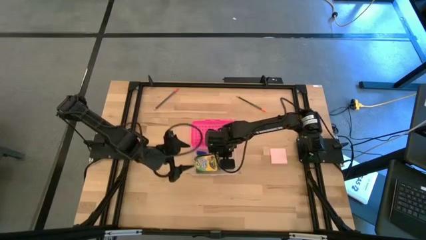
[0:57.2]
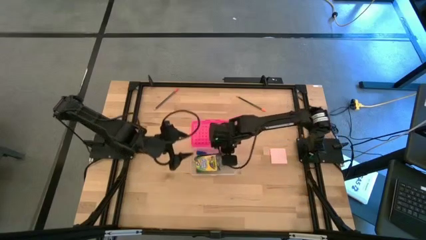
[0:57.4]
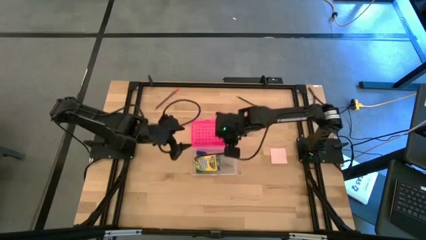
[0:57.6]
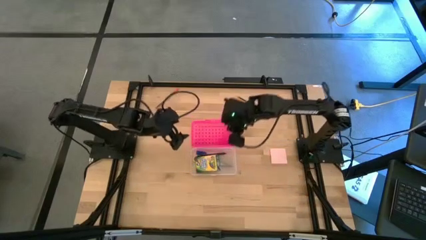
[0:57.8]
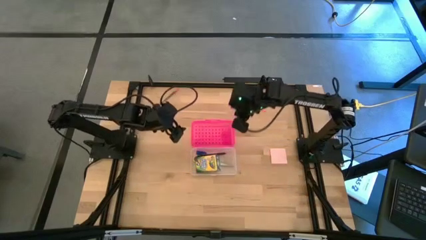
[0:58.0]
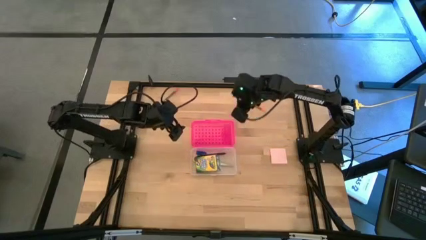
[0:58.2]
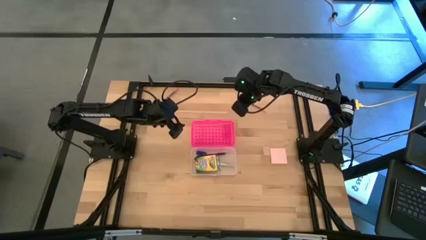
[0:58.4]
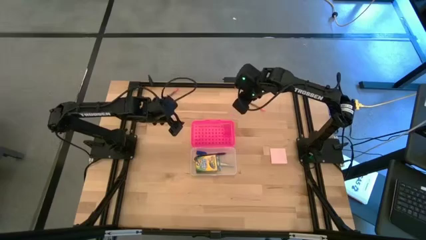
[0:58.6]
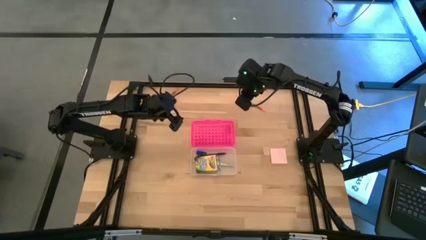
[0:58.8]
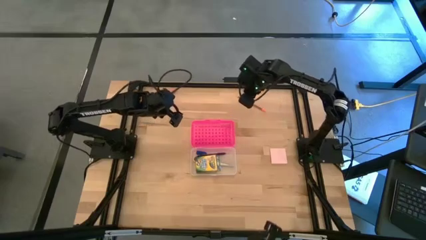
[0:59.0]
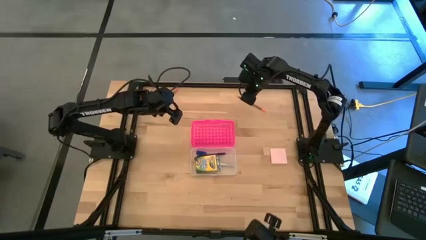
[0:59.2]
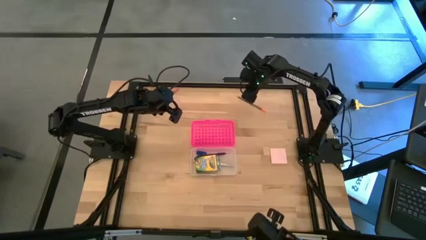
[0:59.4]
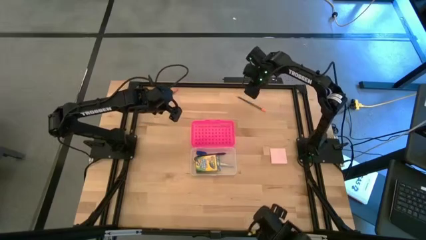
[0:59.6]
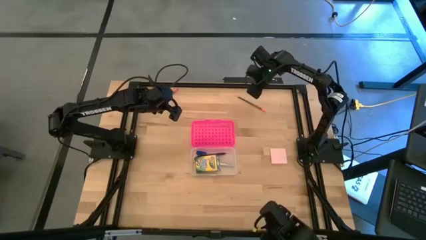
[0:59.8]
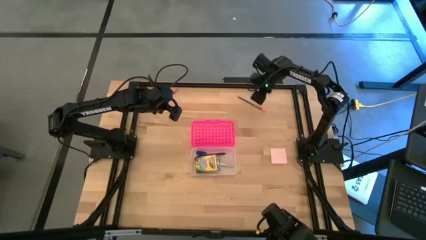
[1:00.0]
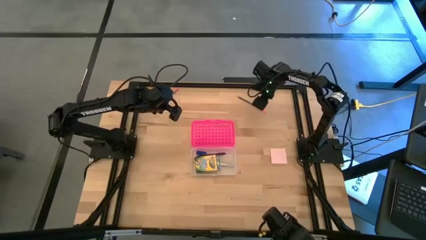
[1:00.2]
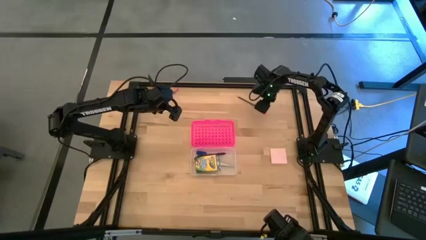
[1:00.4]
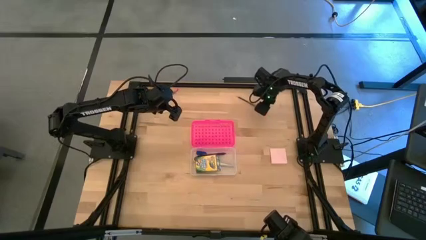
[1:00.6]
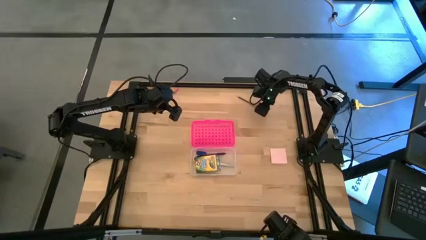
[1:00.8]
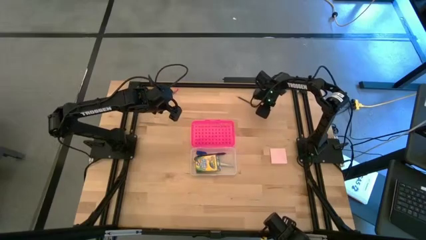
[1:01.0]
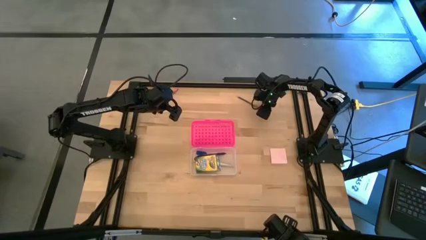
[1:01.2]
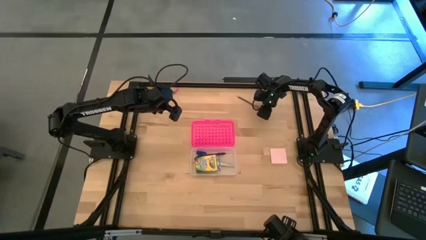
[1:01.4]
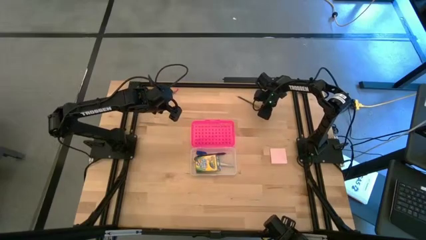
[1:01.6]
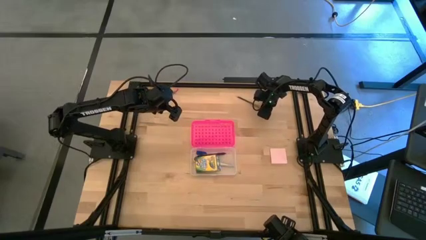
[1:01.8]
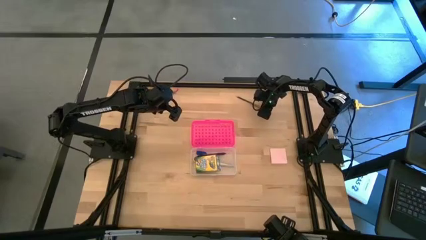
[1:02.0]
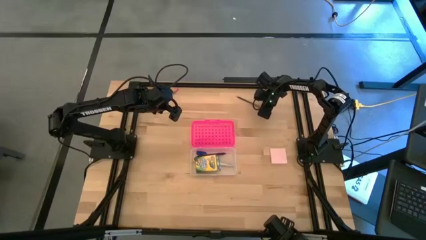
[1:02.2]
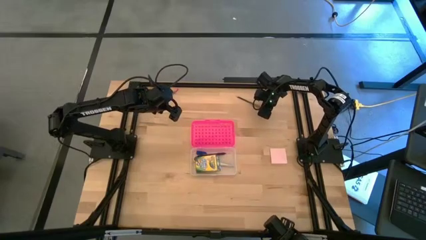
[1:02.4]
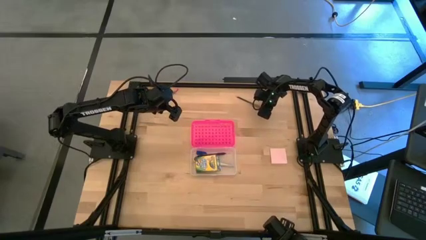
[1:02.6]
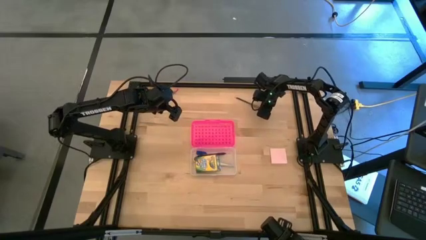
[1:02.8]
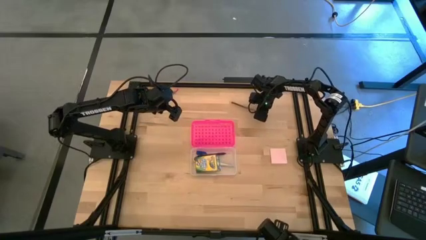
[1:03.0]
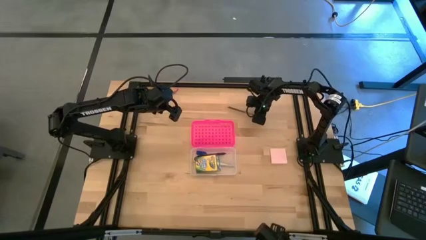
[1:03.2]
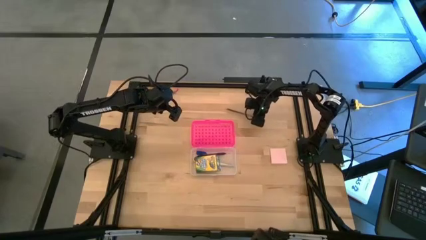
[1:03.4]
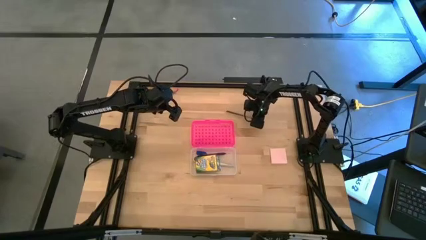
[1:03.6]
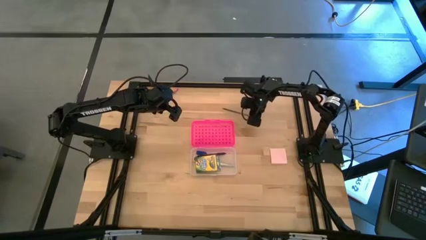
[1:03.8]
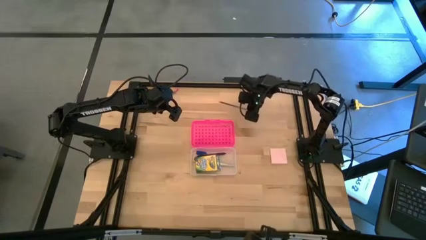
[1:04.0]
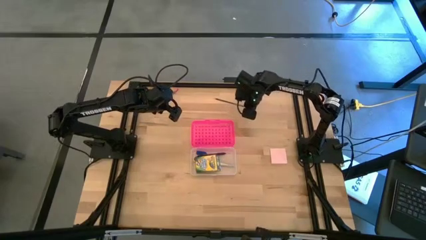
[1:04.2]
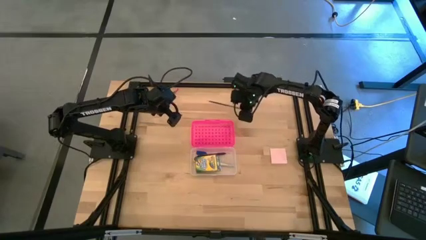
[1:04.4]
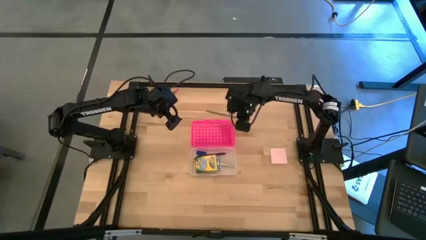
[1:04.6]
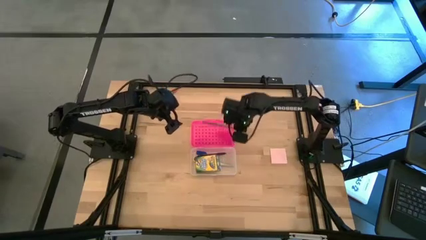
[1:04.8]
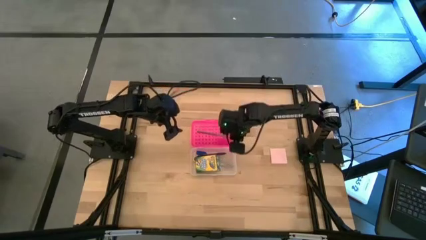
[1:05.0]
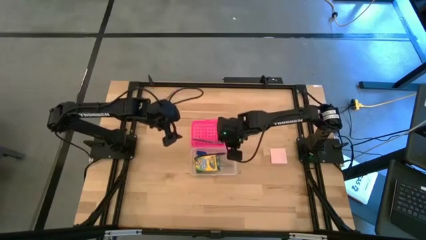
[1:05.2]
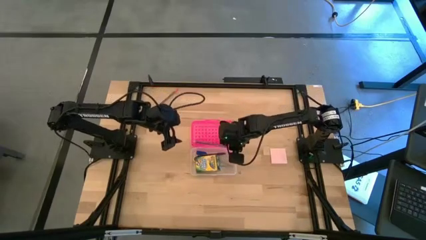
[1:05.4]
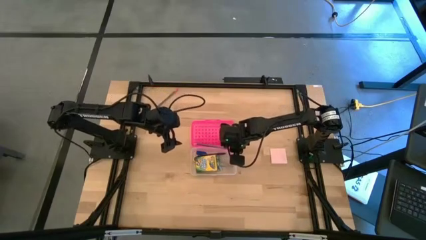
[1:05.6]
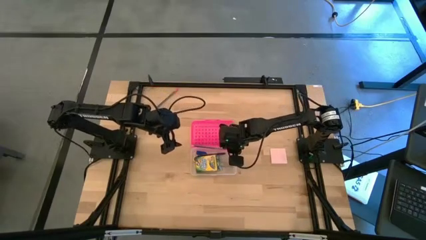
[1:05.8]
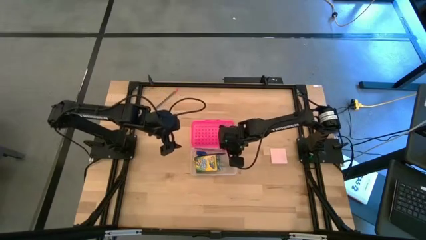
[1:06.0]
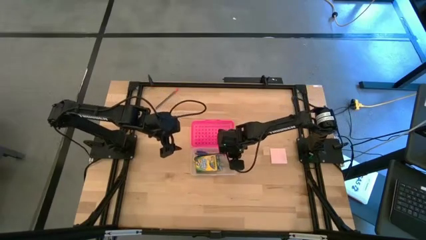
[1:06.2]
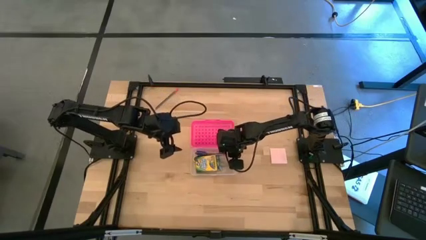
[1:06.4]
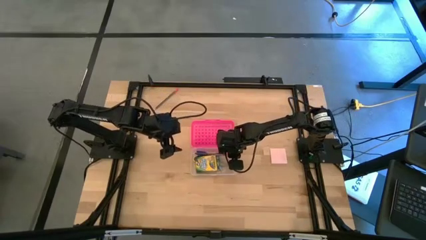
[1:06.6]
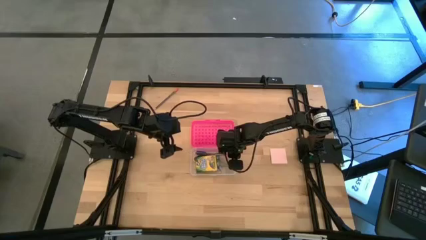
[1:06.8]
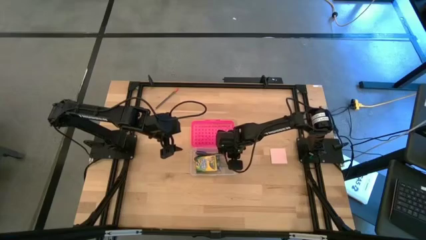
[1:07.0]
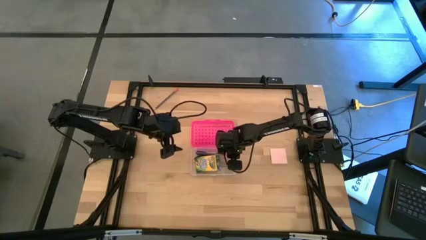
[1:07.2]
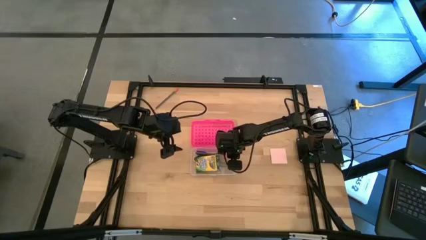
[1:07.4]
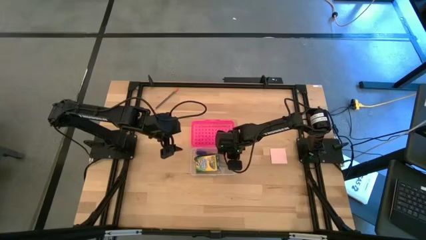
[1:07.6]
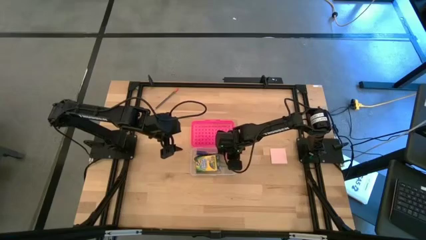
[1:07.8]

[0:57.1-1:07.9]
Task: Pack school essentials
Put the right black pencil into the pencil case

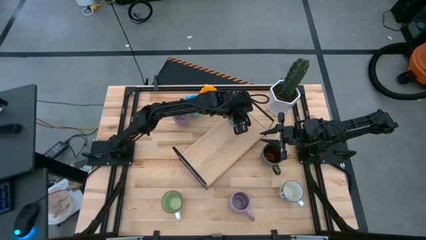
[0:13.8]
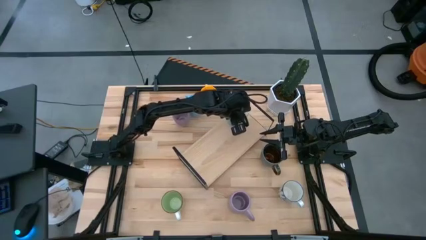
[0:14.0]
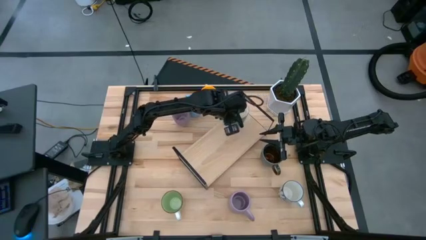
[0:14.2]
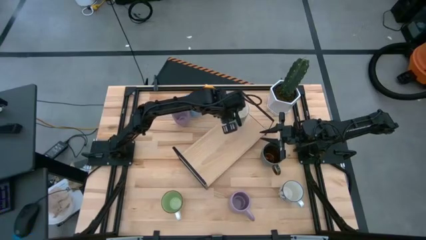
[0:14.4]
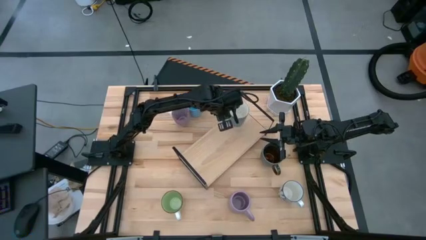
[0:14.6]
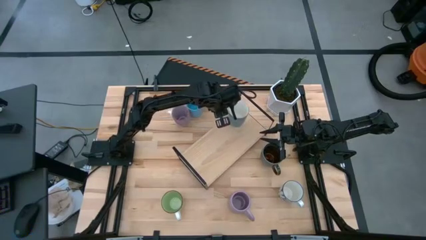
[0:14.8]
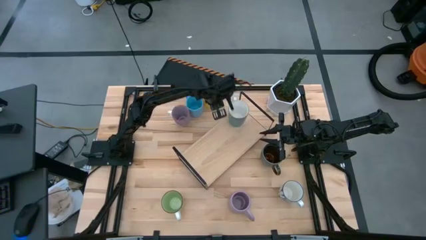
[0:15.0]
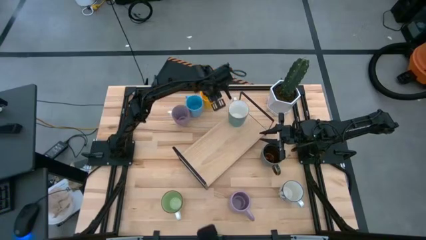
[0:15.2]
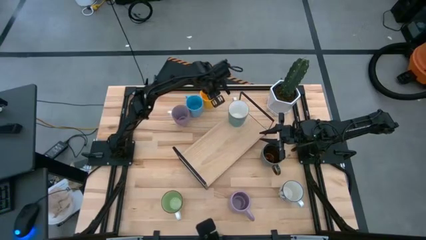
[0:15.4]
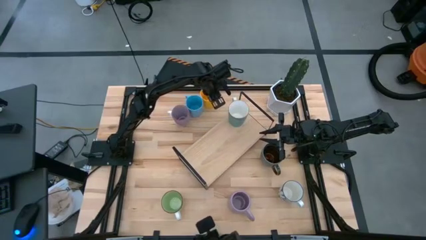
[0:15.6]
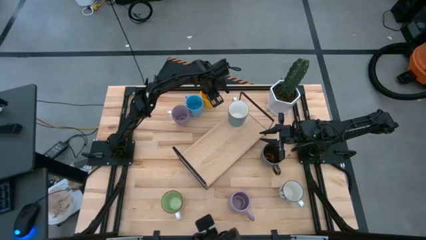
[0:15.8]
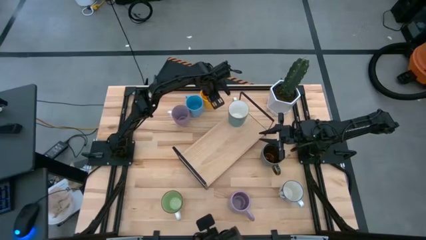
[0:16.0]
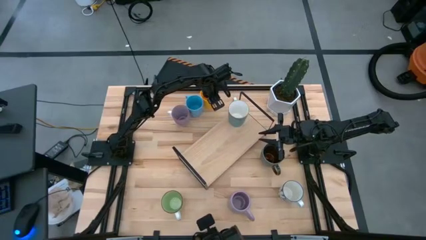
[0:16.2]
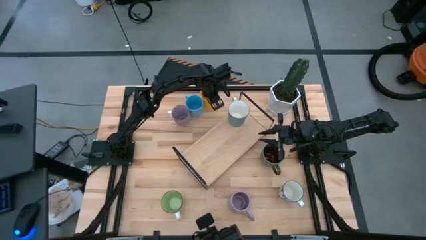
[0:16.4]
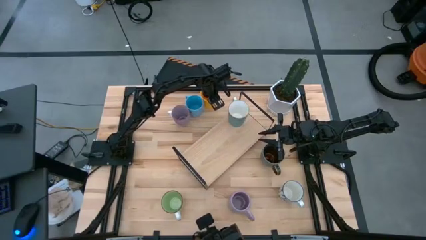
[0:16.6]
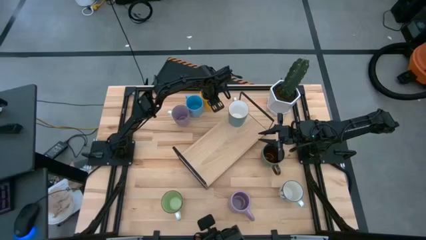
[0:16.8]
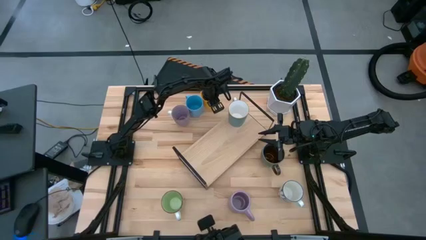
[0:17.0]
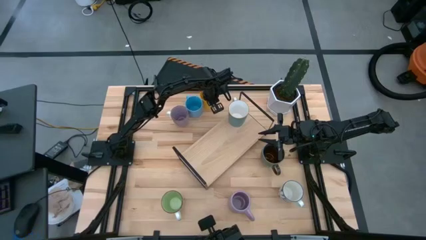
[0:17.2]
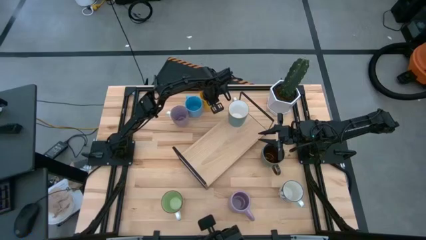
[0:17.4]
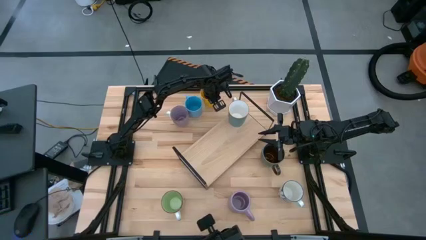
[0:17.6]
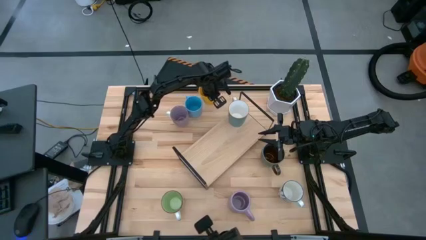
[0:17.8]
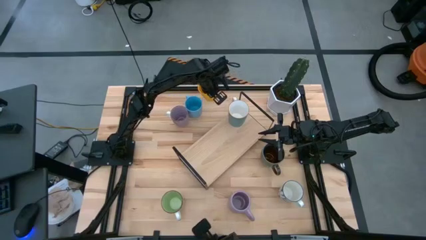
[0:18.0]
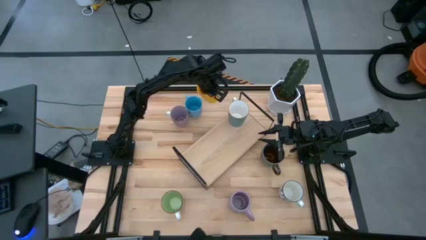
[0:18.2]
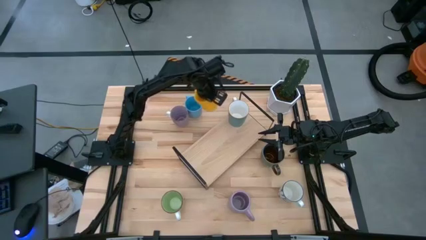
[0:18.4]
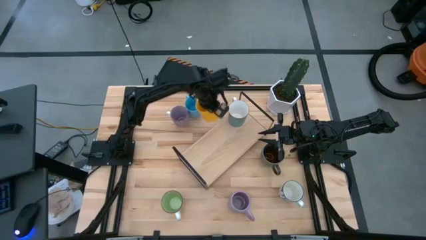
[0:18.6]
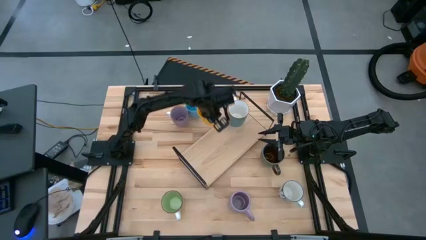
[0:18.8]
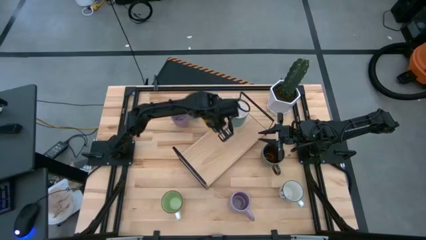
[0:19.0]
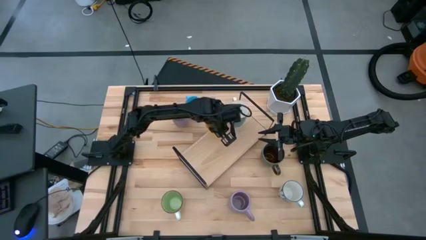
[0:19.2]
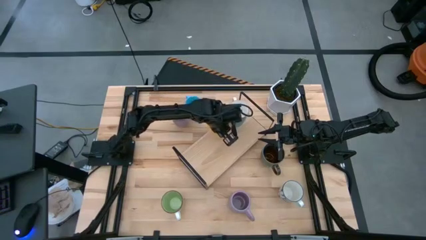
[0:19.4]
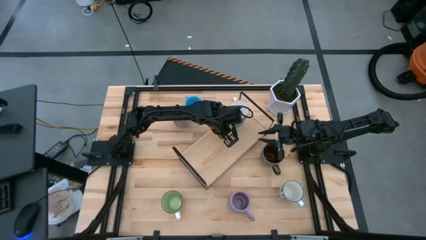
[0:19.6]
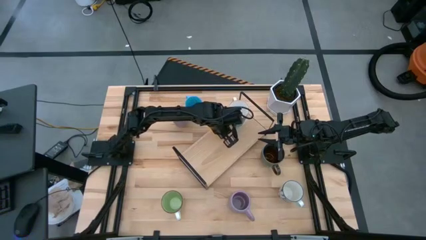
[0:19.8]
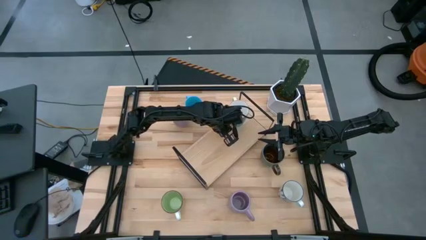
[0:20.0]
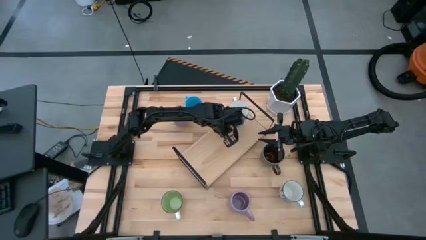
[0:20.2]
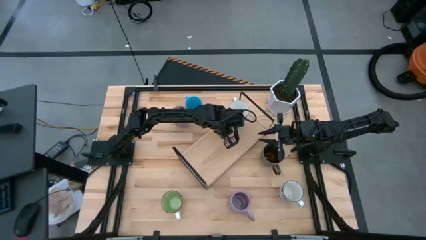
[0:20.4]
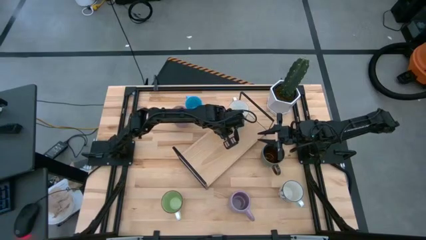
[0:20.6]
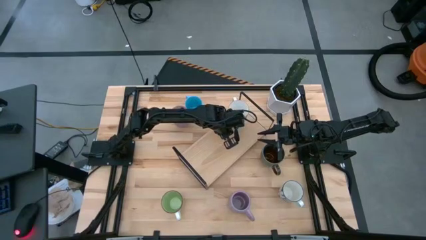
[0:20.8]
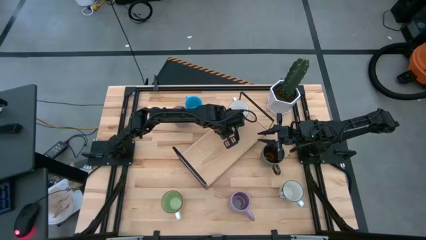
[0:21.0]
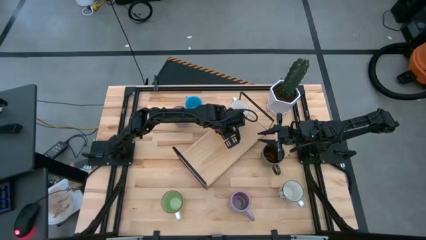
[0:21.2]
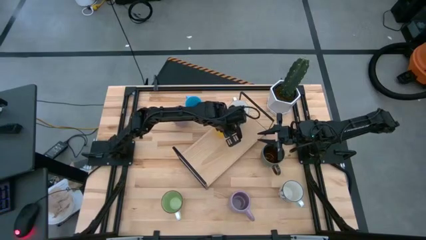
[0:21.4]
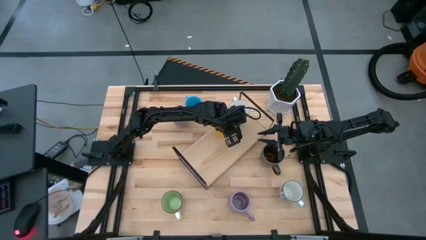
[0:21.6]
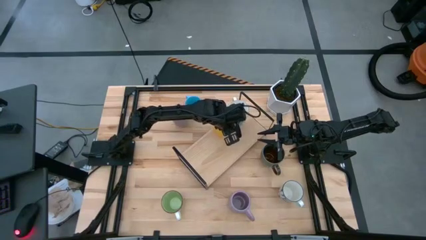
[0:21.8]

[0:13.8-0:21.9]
Task: Place coffee mugs
Put the yellow mug on the shelf
